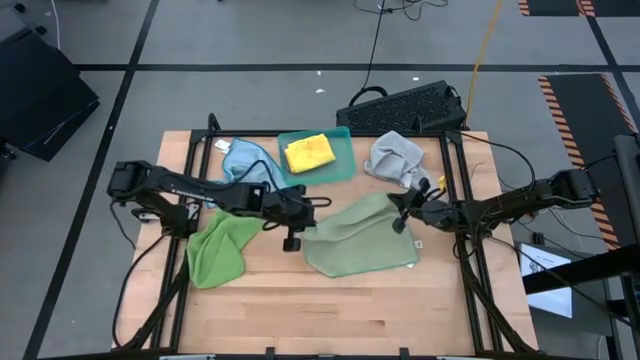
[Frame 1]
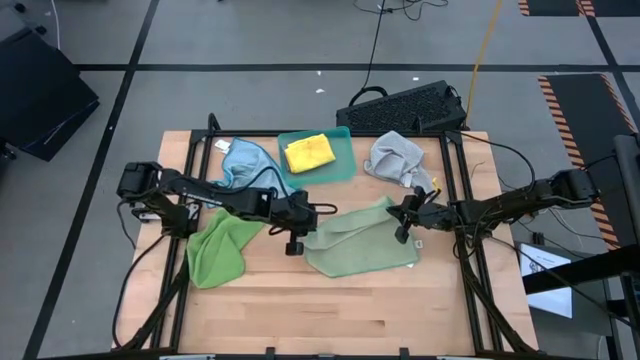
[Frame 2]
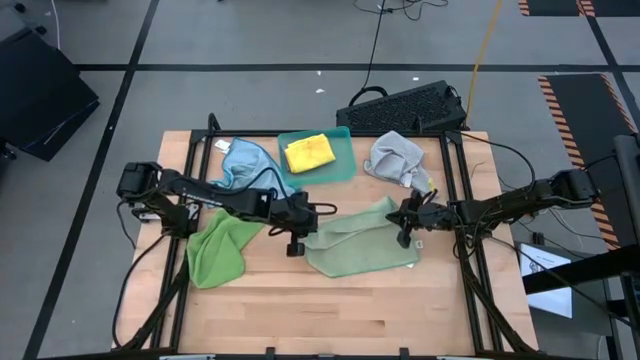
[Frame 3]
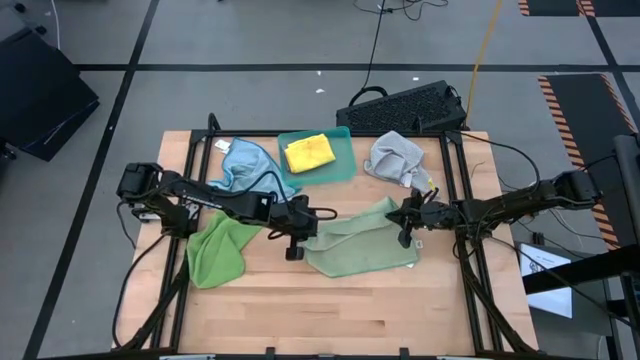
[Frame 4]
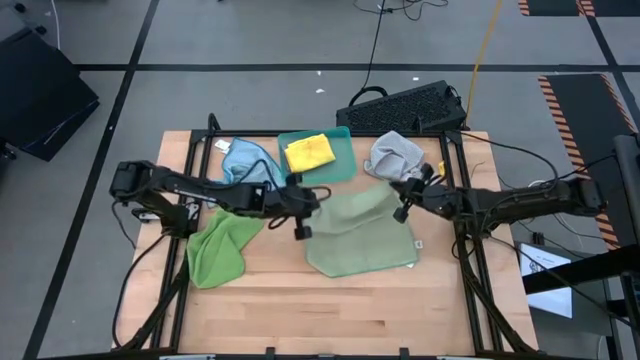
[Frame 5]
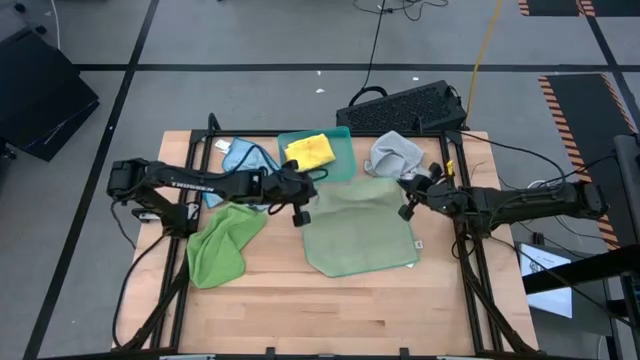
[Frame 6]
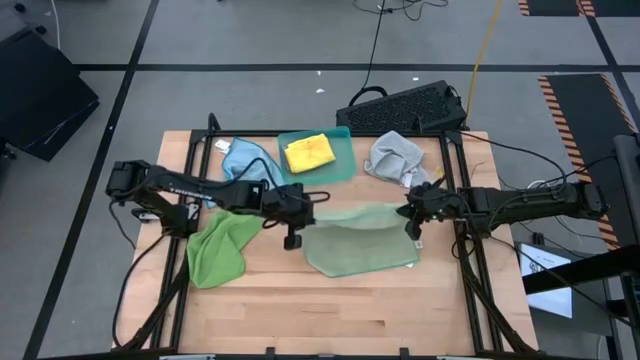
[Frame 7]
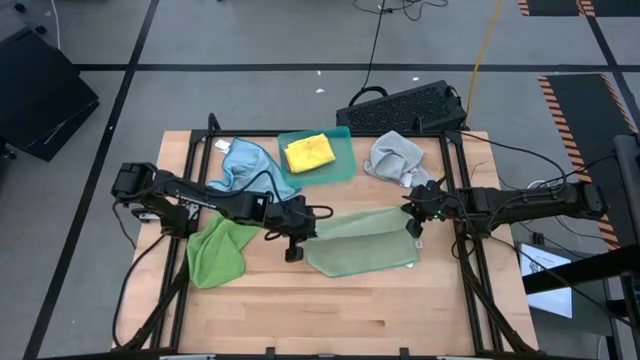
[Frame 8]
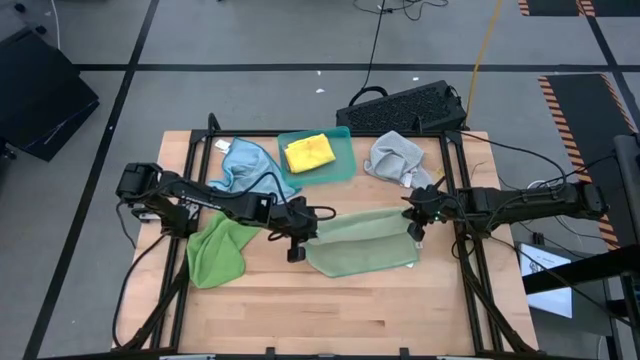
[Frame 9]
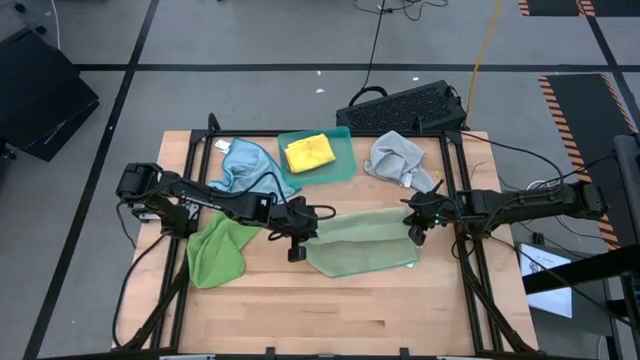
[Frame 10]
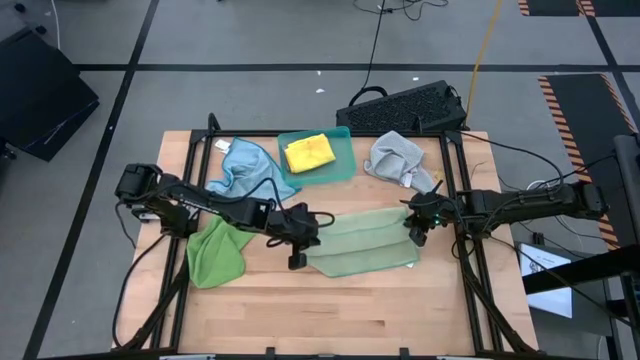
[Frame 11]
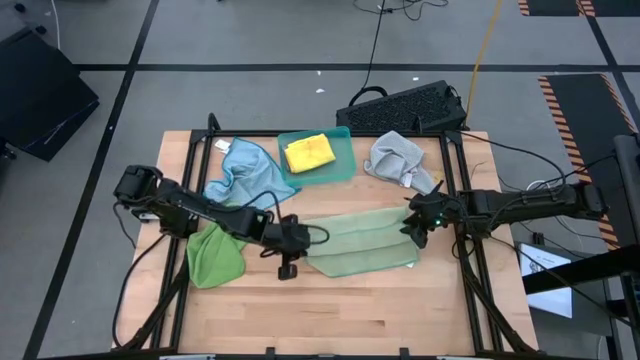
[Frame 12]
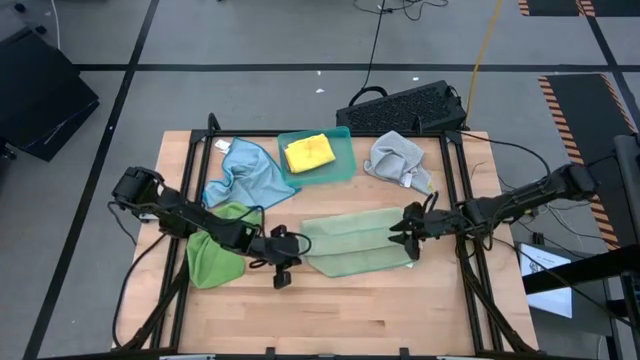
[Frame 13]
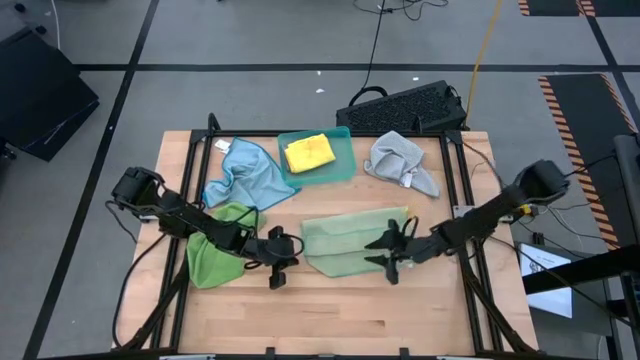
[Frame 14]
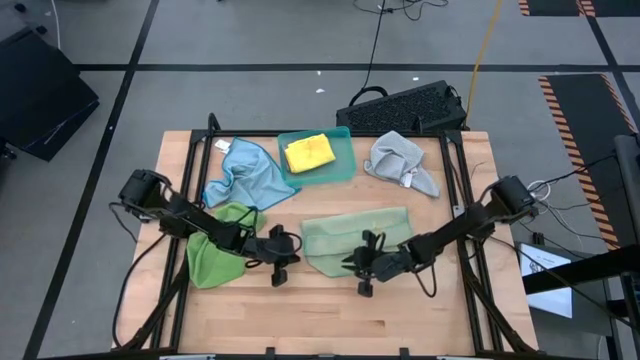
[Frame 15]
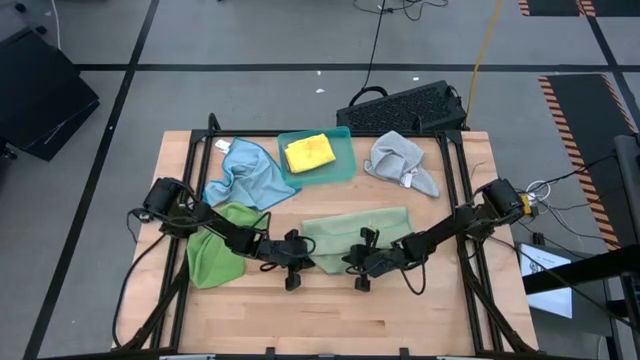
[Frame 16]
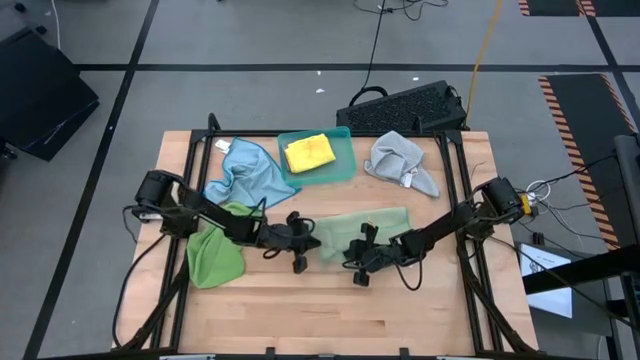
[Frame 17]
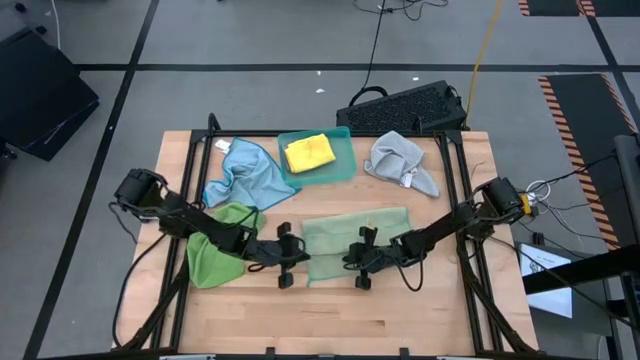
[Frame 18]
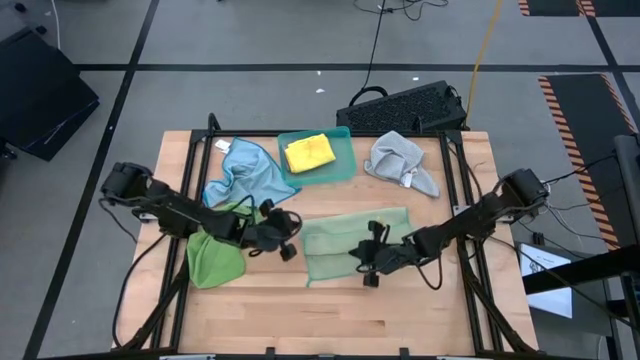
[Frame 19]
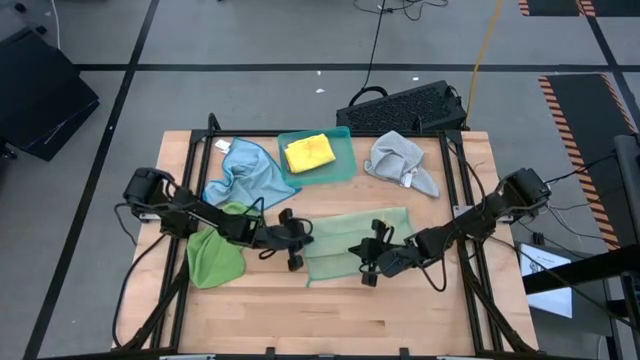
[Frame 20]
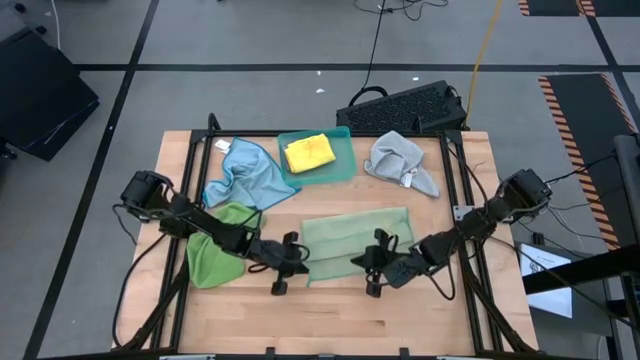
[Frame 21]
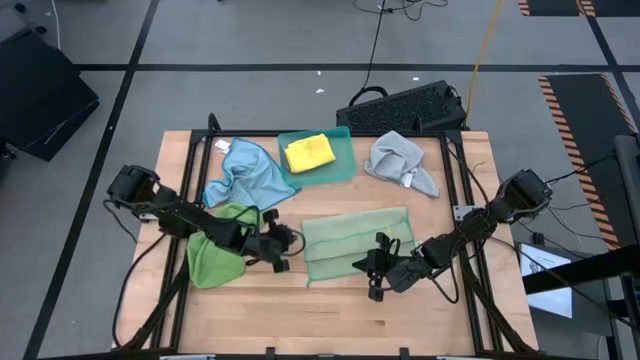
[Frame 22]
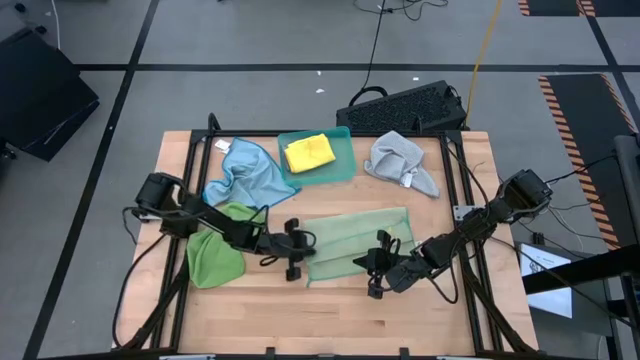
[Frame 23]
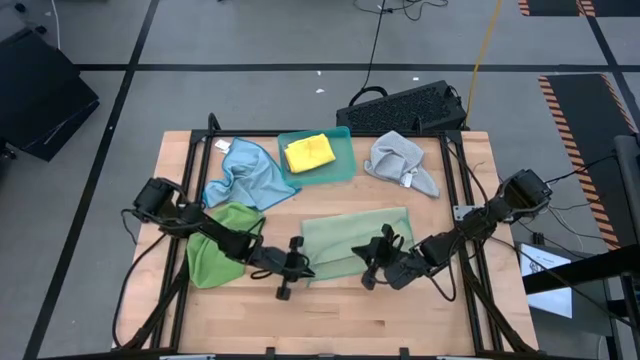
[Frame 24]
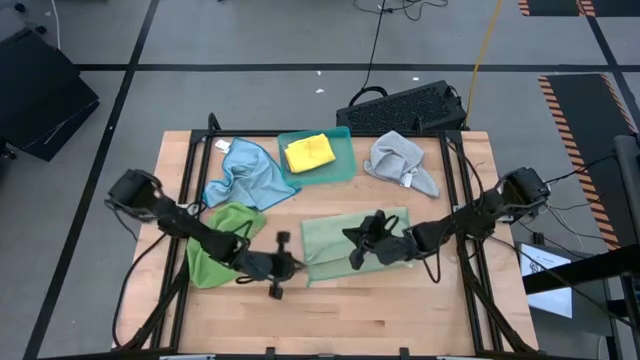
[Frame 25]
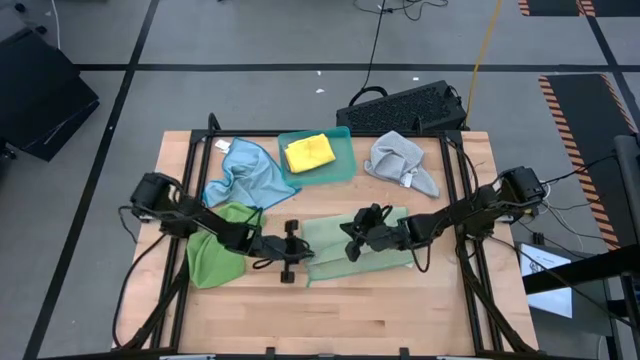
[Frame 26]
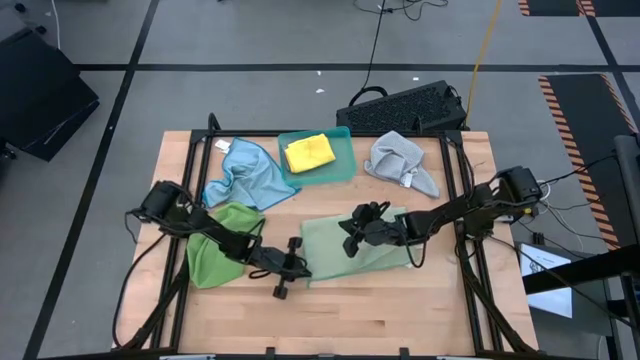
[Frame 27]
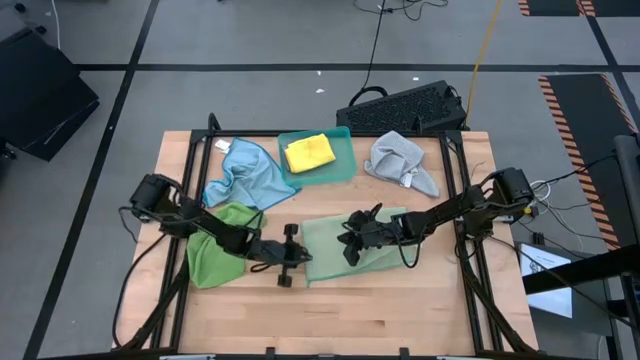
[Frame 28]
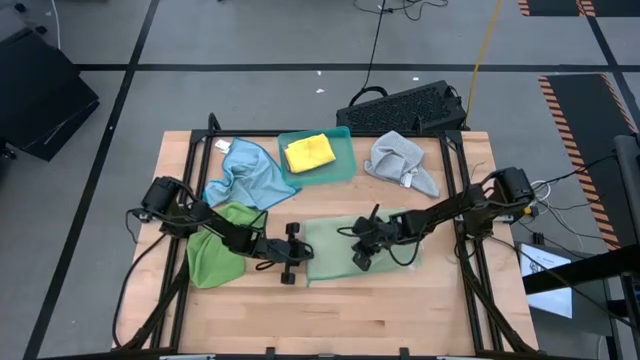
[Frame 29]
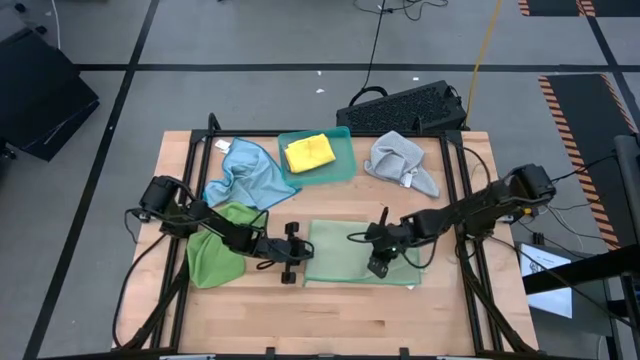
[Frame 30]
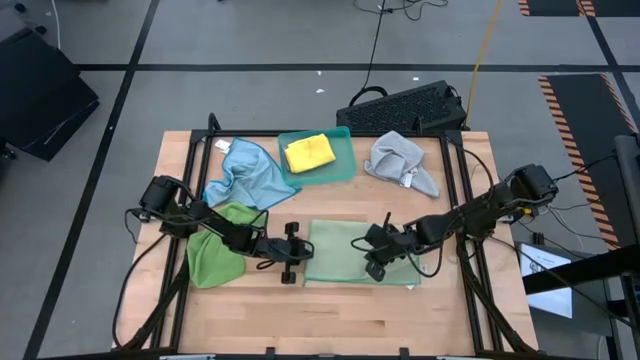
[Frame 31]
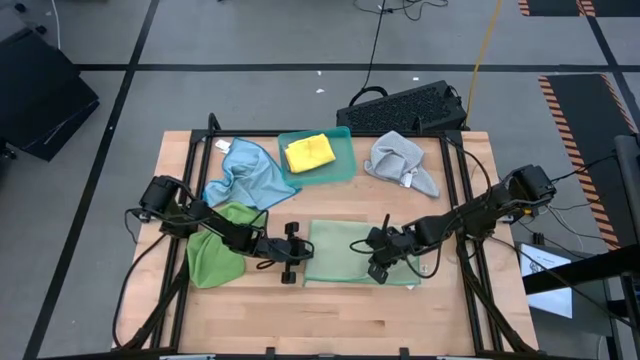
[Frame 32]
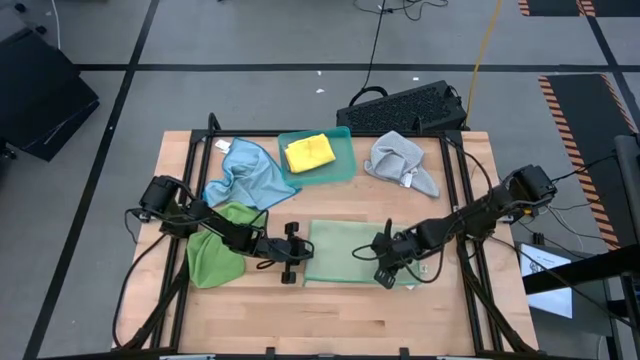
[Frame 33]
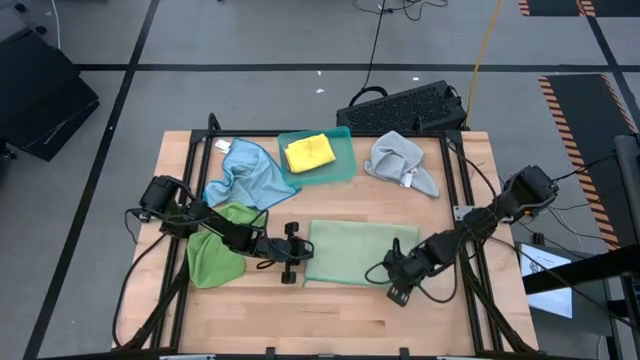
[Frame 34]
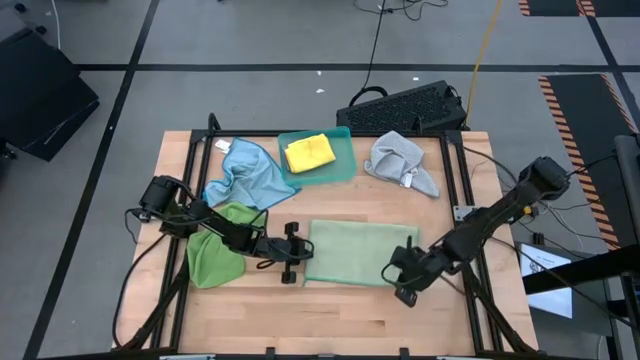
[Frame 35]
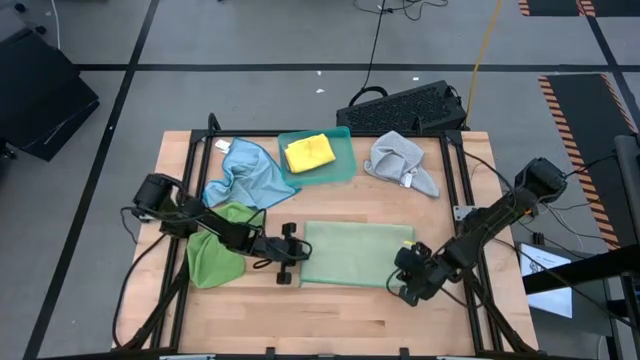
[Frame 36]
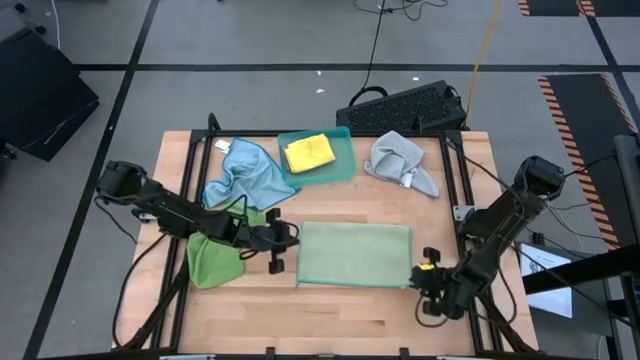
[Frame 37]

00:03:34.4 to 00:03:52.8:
Task: Fold microfiber towels
Fold the light green microfiber cloth

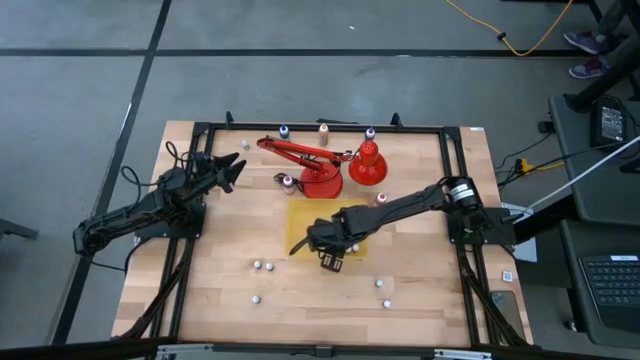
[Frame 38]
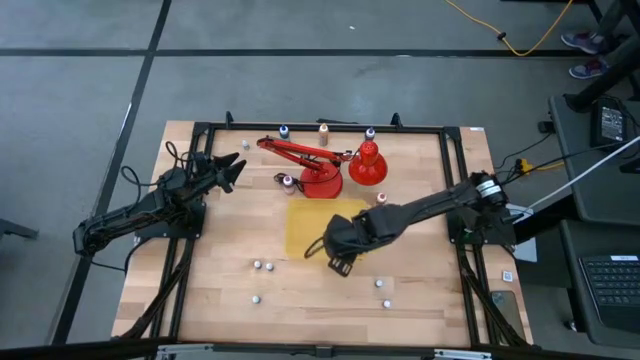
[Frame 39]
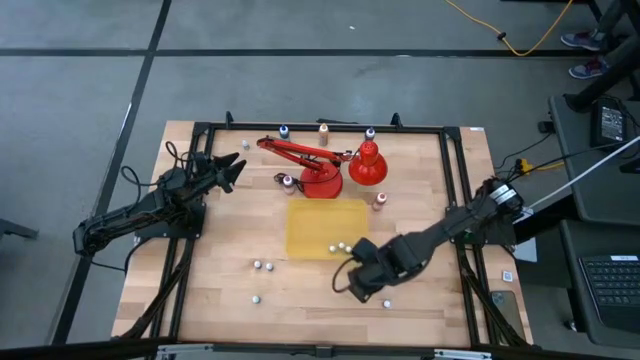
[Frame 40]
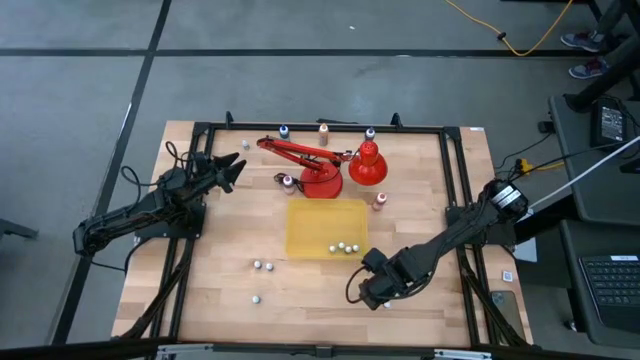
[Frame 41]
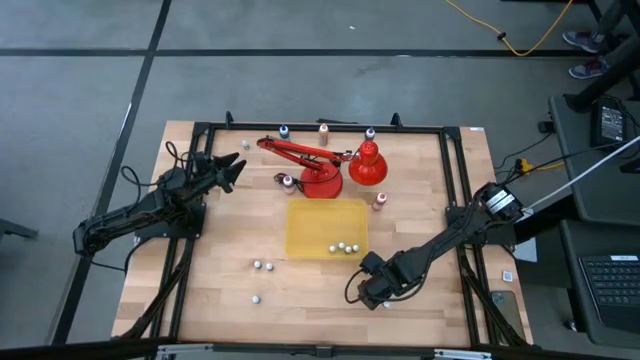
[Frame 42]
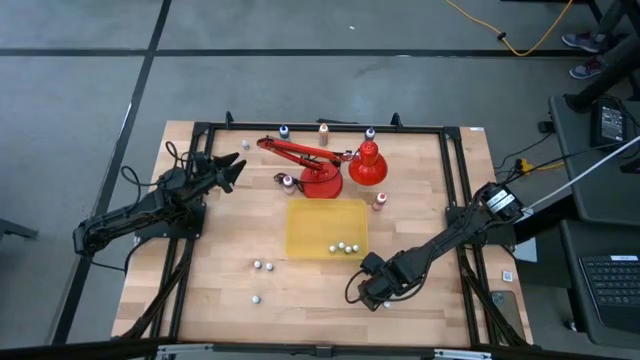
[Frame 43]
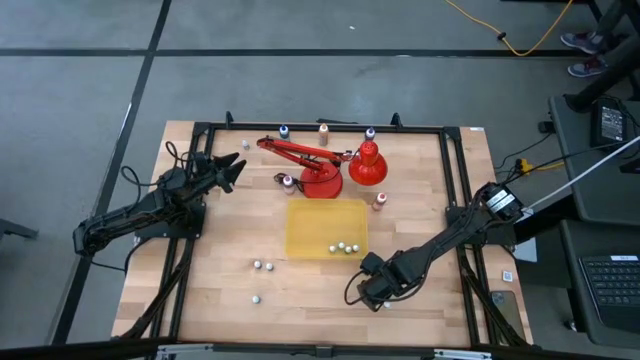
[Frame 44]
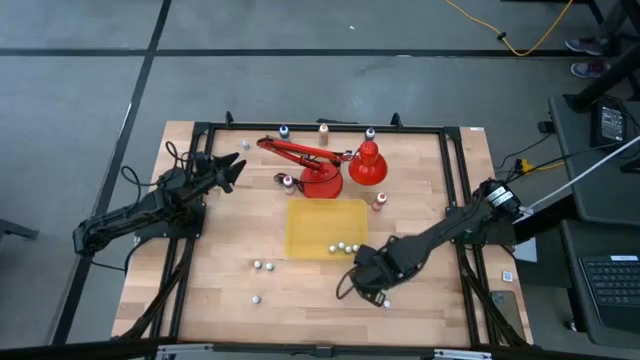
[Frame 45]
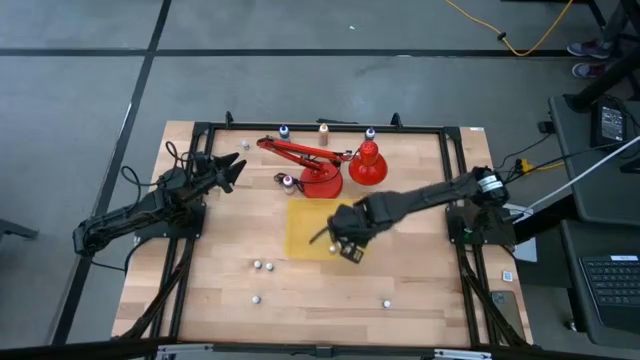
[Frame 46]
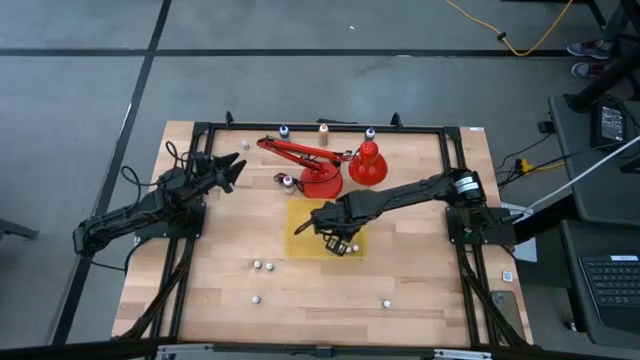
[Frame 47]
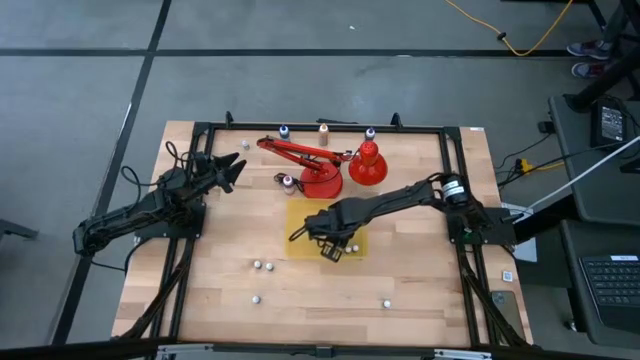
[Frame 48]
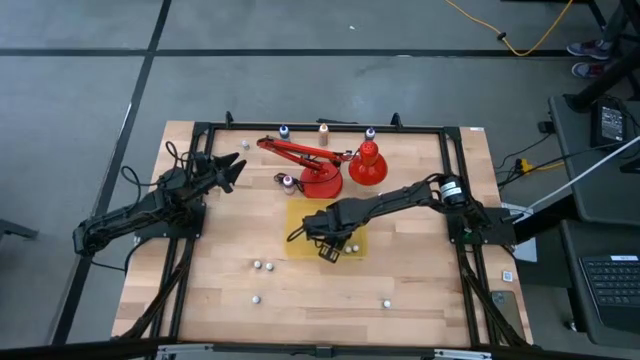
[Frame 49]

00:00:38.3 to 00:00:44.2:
Task: Pick & Place food coloring
Put the small black food bottle into the yellow bin
